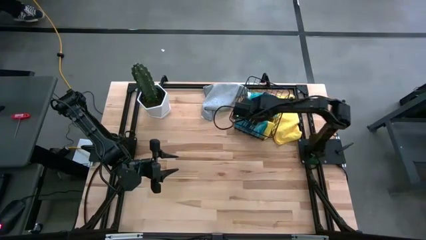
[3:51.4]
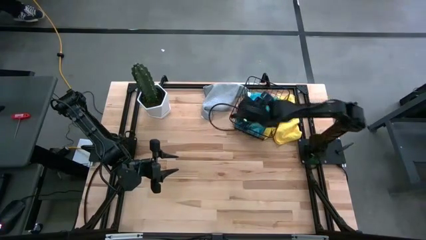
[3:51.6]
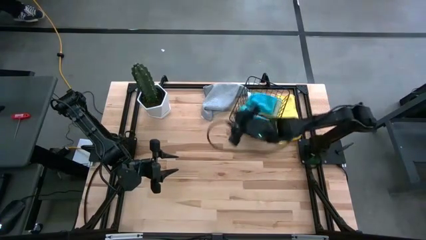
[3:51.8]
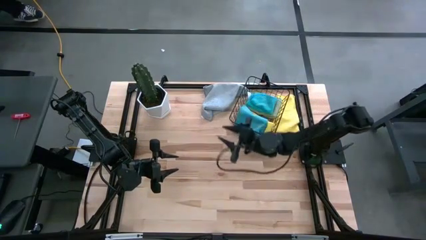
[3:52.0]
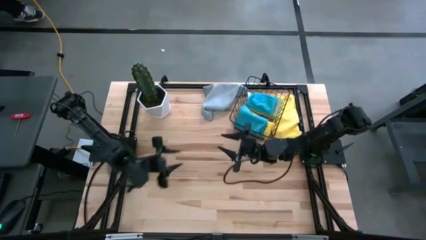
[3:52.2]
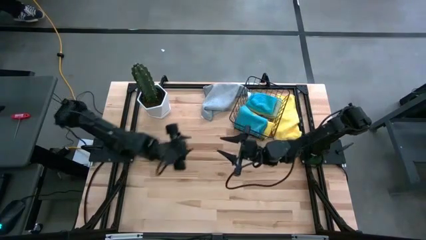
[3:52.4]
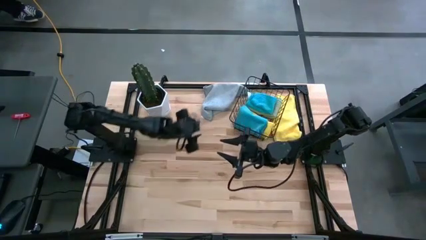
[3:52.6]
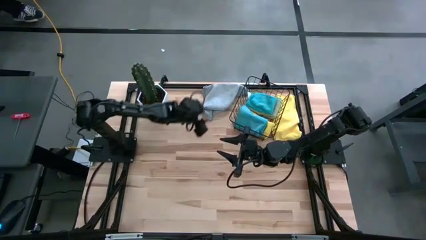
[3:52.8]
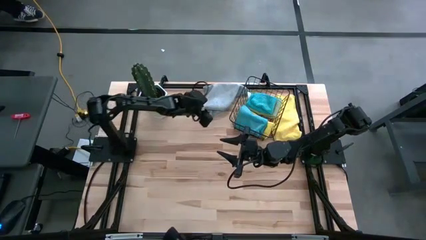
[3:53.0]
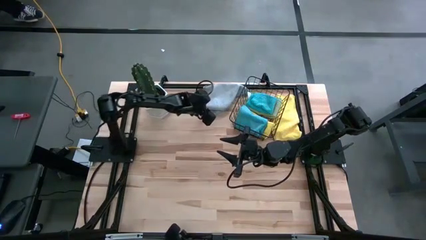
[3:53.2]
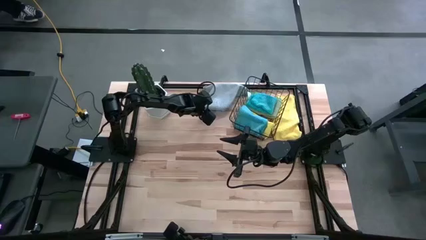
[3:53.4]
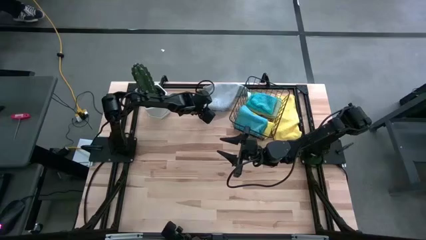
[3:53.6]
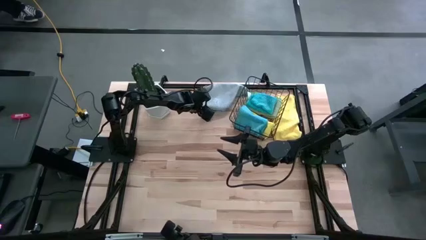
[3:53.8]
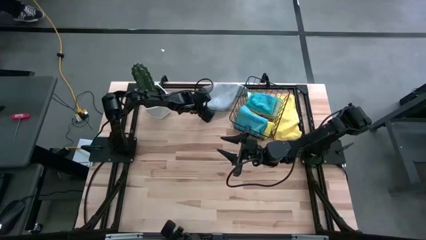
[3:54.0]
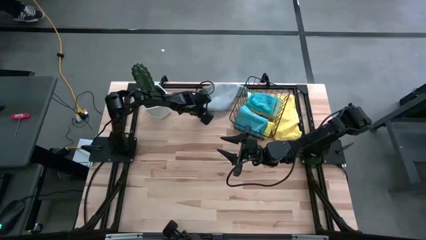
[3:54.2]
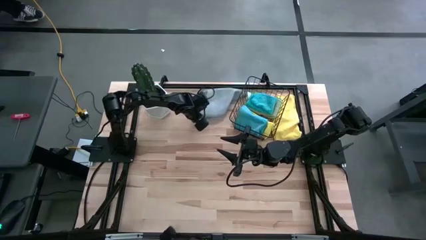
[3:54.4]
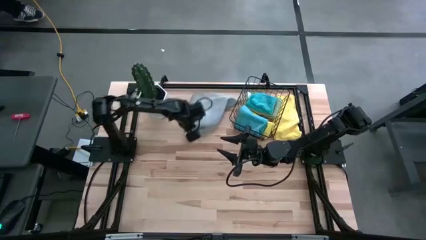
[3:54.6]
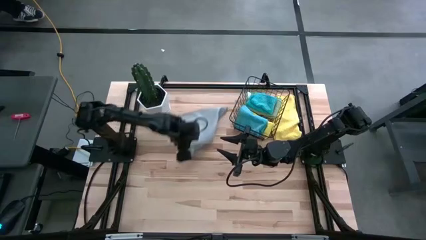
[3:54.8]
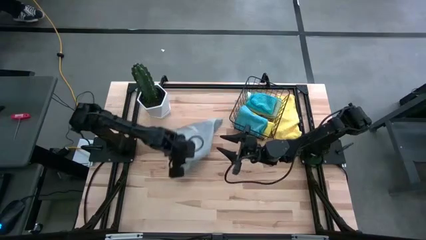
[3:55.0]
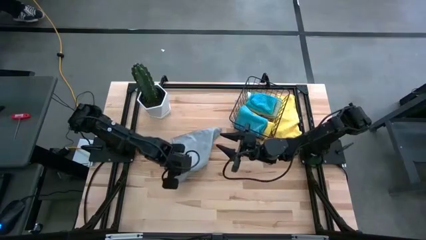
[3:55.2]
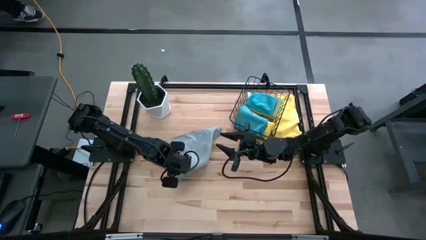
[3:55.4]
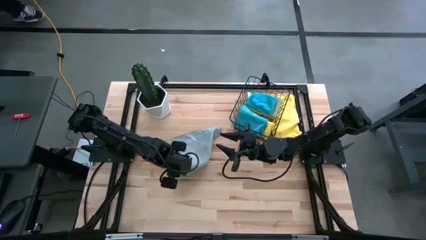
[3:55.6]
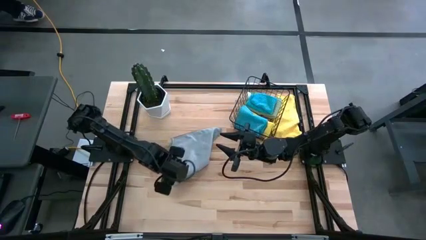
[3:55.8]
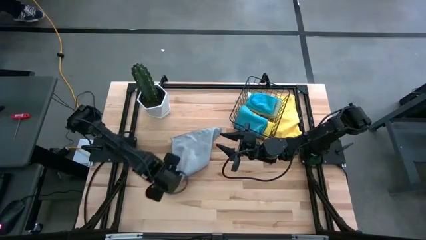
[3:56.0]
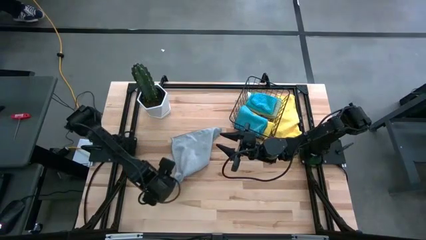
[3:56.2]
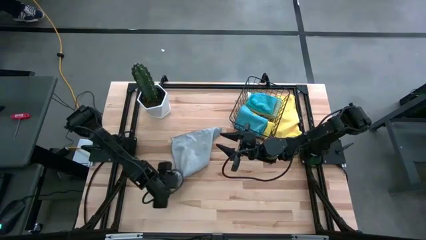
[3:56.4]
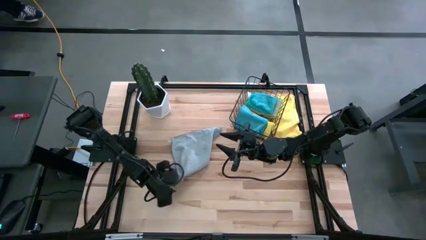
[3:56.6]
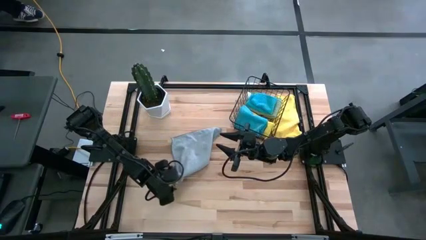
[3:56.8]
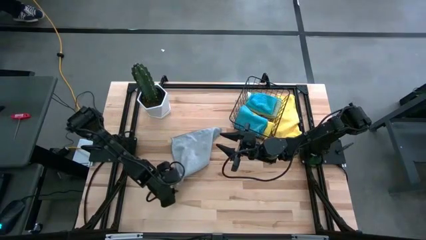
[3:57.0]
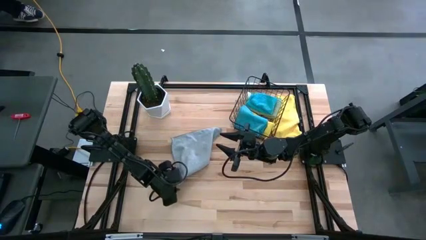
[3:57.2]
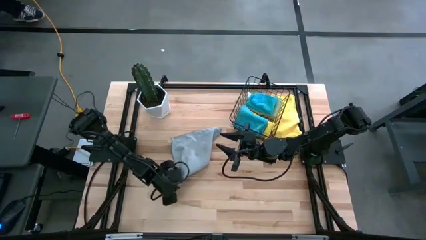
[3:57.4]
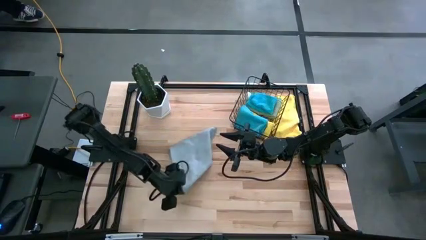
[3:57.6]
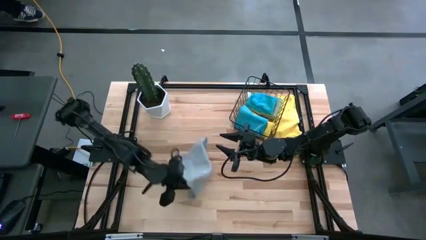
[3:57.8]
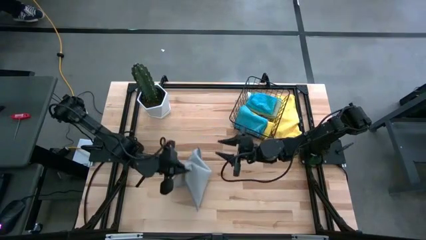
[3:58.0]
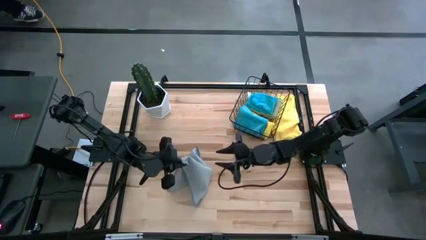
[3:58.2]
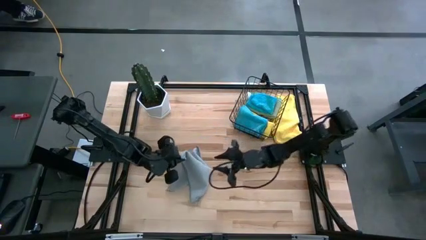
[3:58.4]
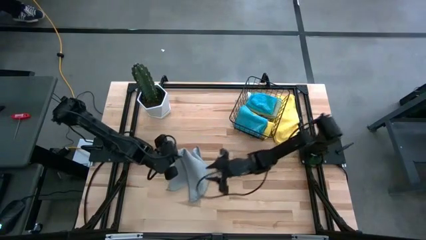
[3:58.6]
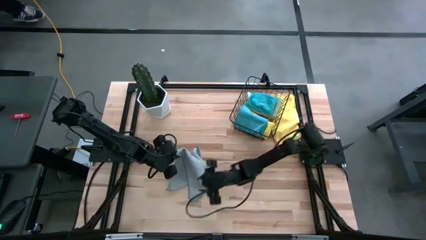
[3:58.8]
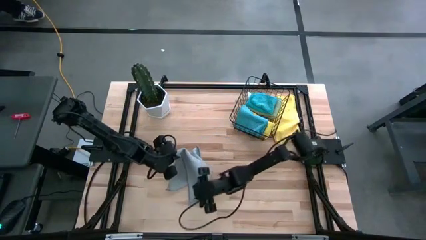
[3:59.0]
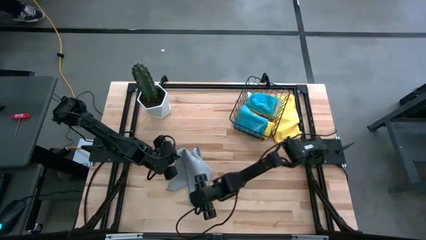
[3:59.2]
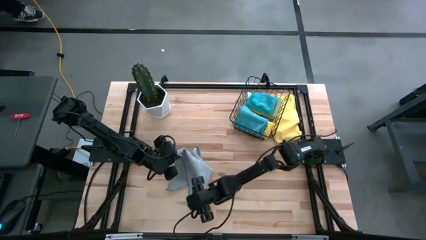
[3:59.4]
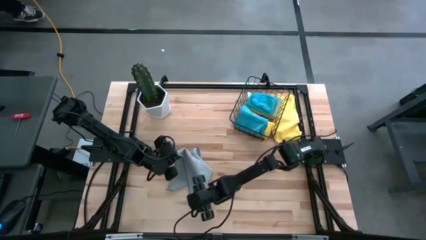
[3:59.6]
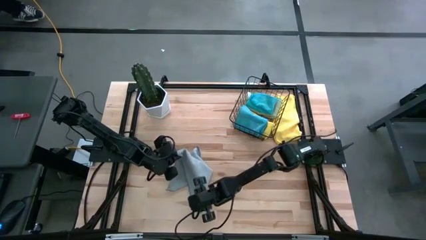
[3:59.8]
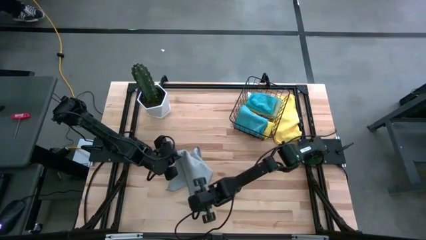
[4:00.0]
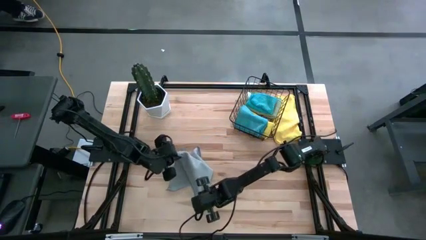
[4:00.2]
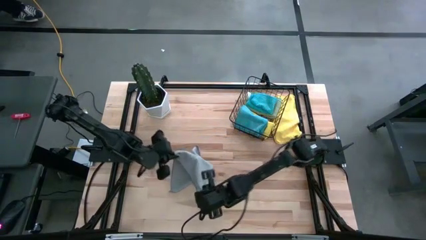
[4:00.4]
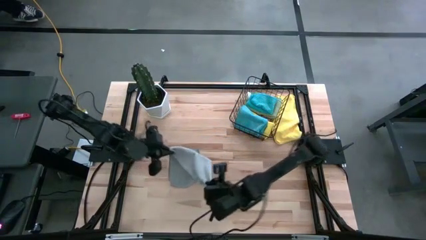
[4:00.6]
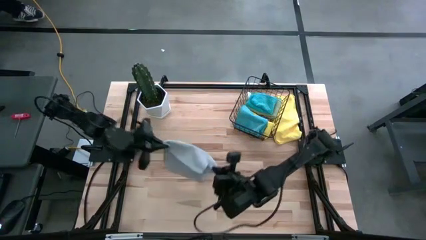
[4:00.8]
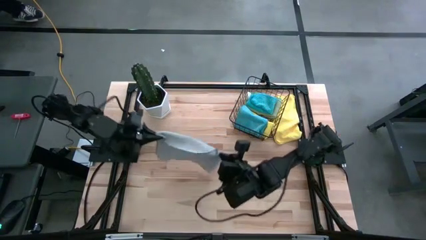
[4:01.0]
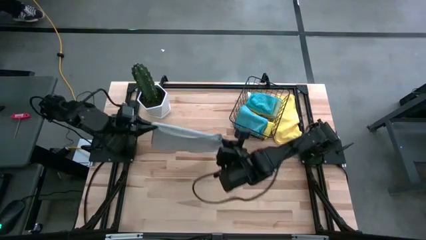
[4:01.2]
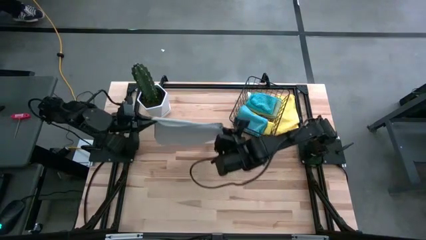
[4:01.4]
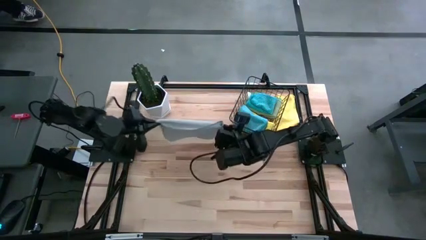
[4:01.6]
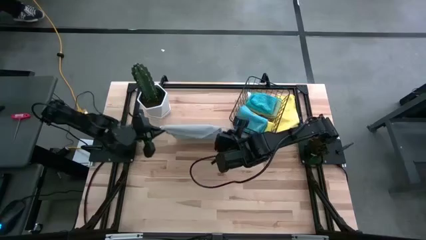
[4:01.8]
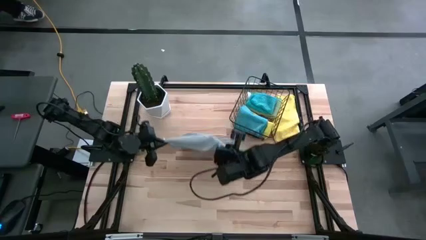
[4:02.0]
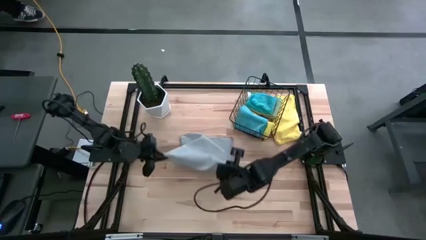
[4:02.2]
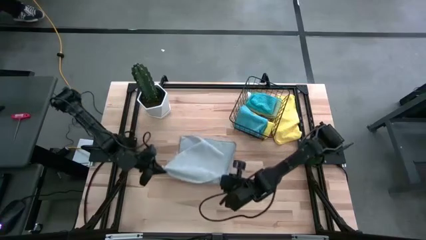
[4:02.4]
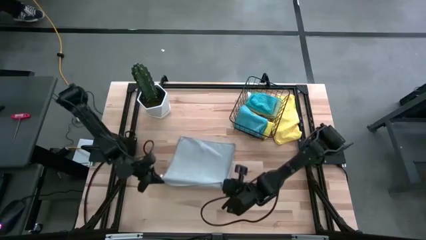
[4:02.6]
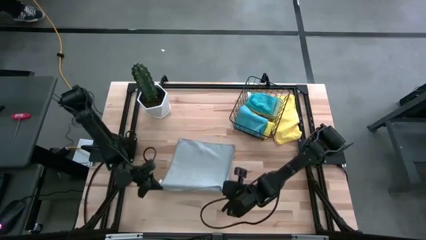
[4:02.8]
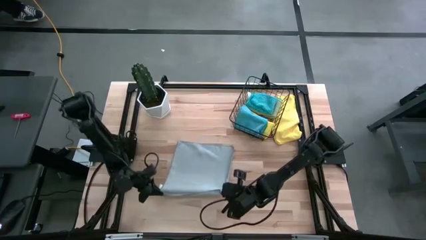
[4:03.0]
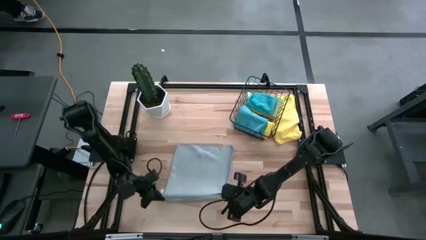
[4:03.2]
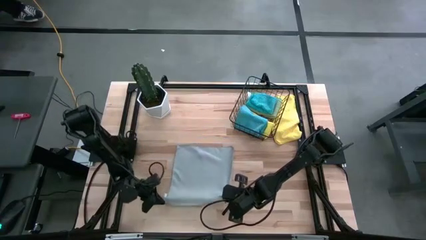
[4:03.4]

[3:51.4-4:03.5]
Task: Fold microfiber towels
Fold the gray microfiber towel

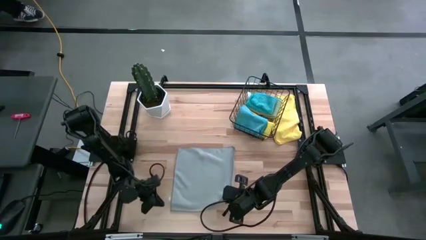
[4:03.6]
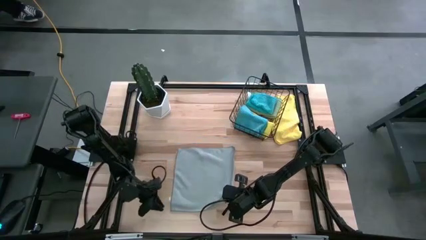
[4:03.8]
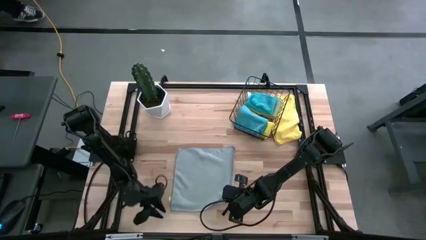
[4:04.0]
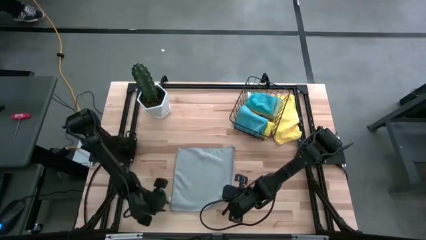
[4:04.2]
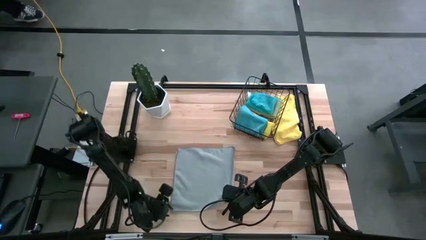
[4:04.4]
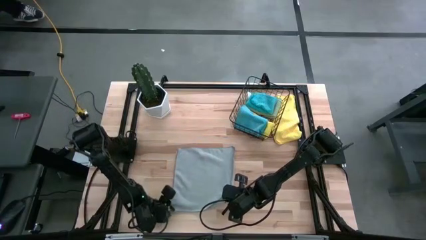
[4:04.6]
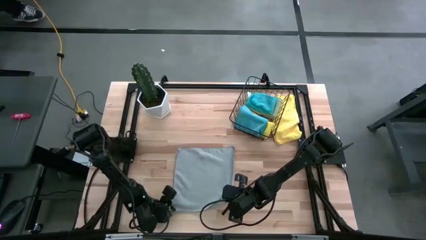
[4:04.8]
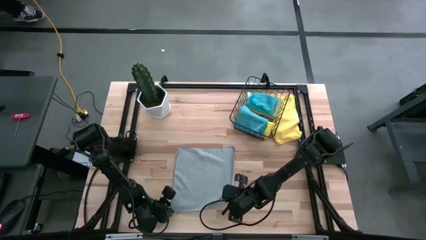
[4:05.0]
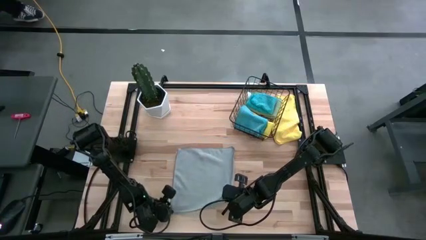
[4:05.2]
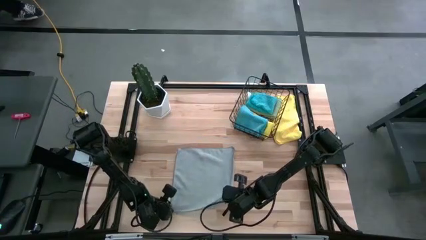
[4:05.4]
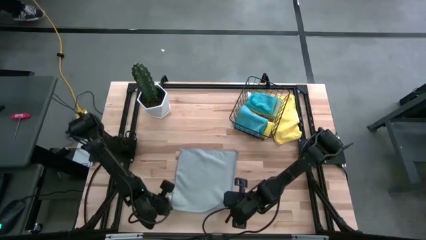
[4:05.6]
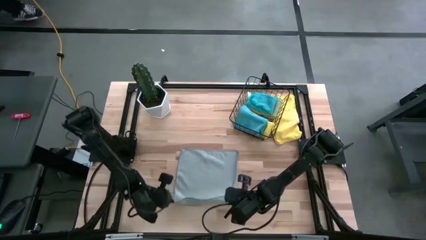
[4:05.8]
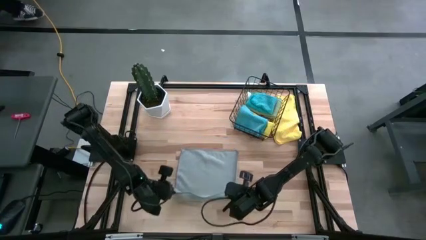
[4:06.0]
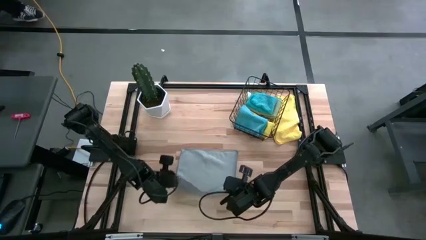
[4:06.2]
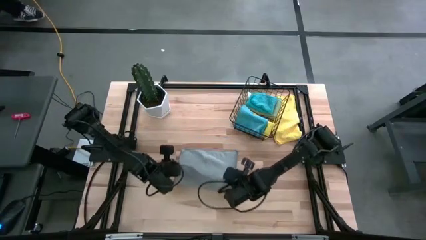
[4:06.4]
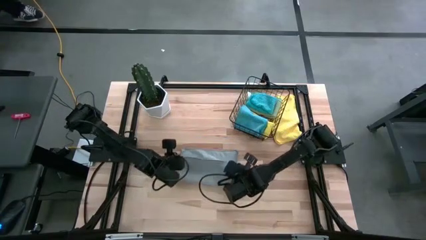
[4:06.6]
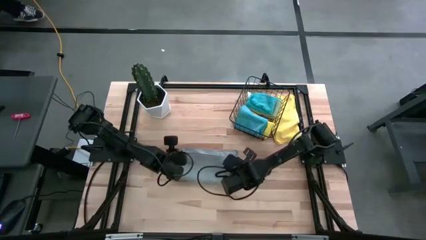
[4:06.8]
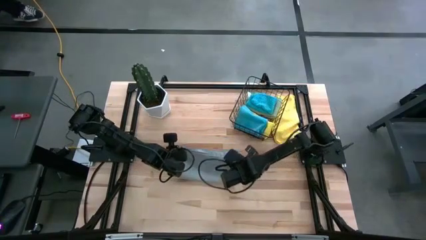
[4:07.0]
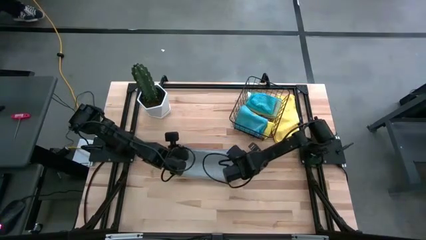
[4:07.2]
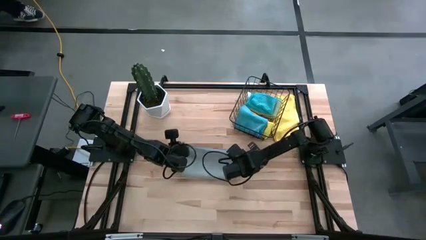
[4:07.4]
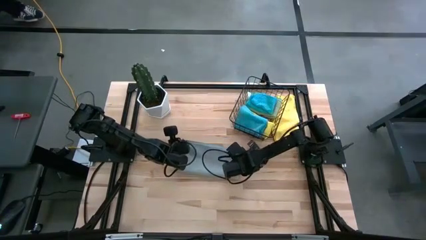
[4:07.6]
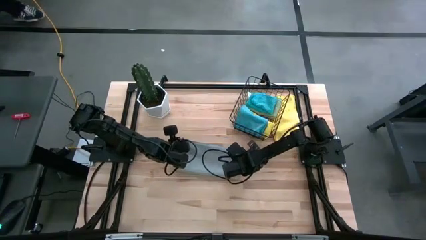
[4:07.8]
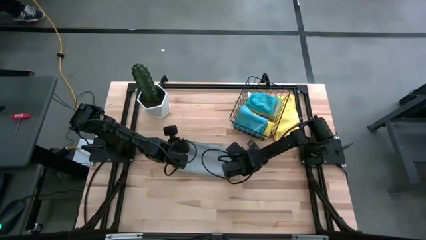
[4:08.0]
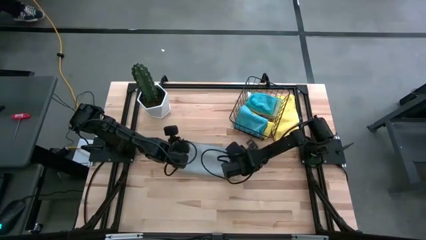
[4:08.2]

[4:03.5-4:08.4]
Fold the gray microfiber towel
